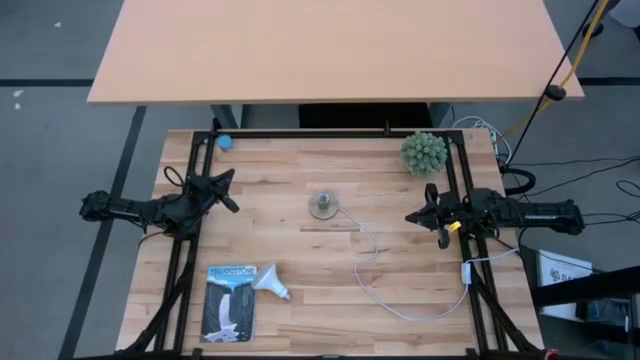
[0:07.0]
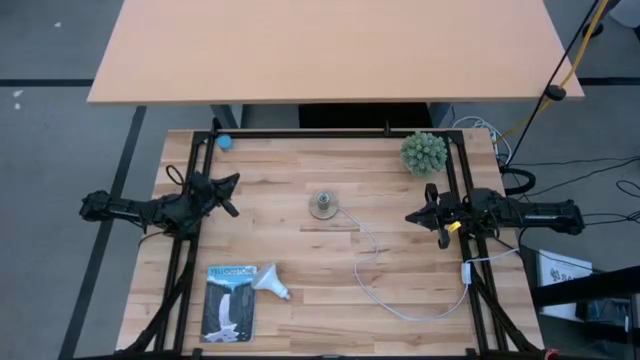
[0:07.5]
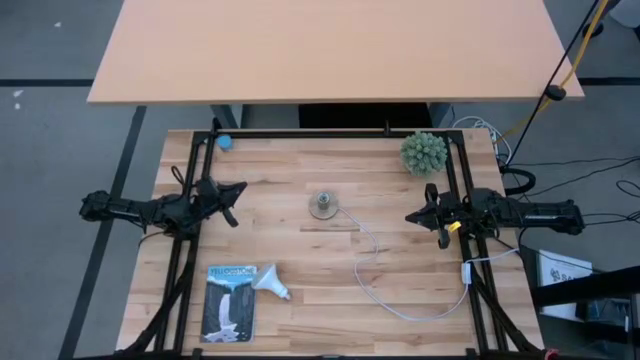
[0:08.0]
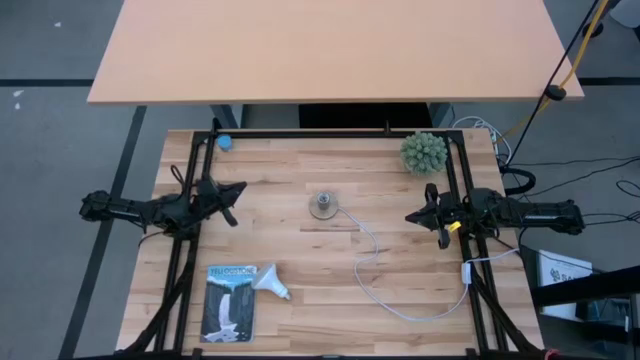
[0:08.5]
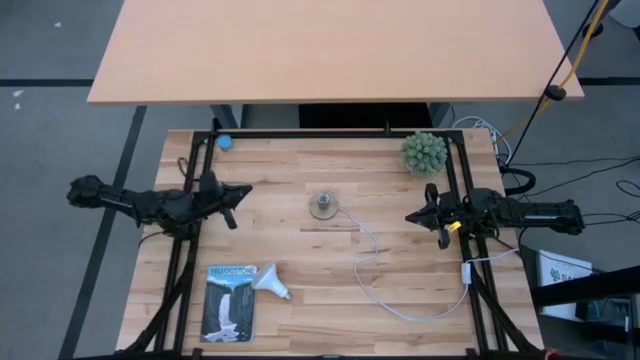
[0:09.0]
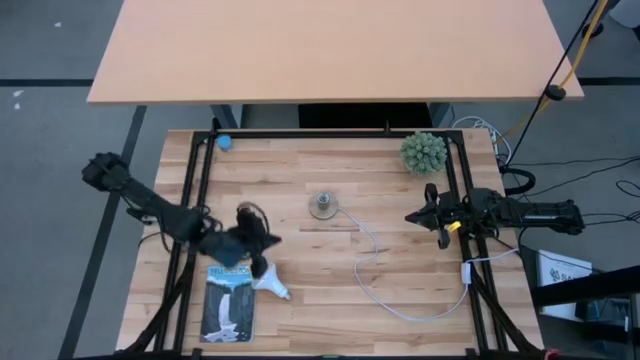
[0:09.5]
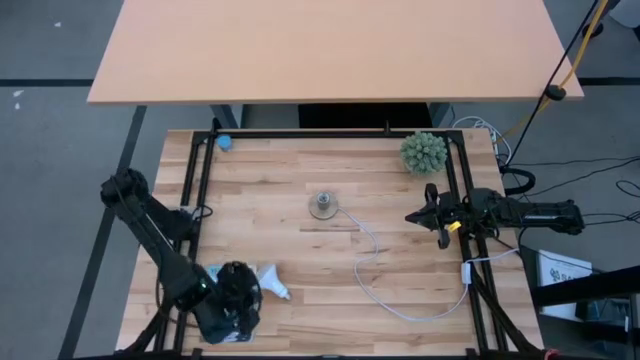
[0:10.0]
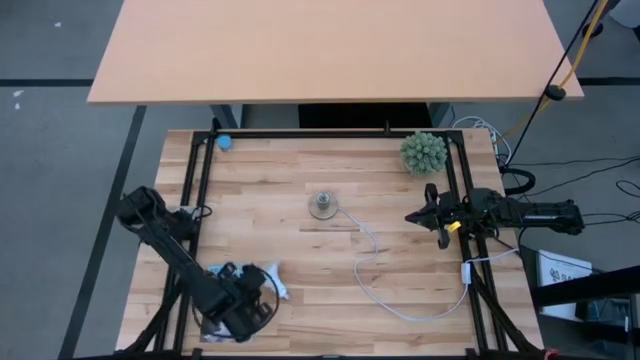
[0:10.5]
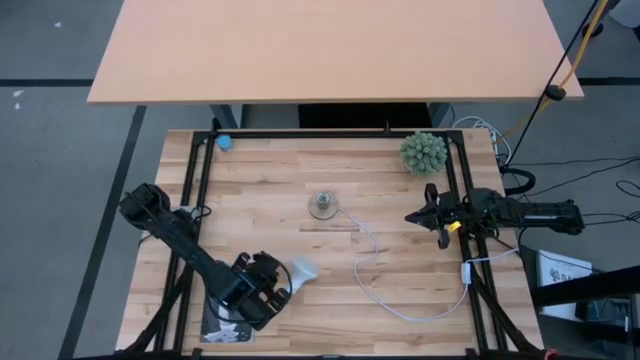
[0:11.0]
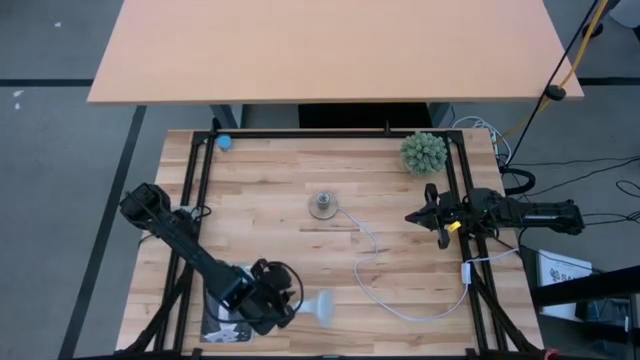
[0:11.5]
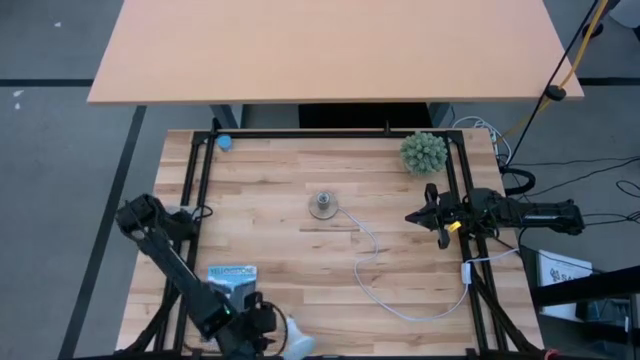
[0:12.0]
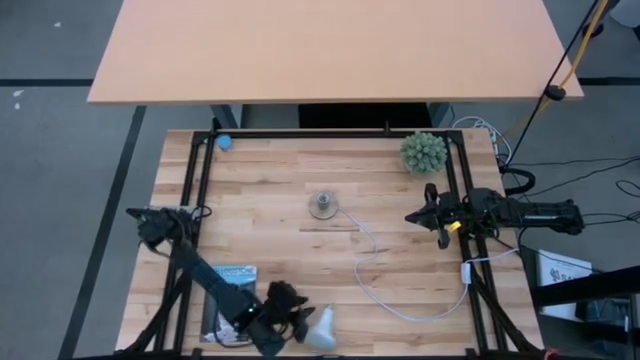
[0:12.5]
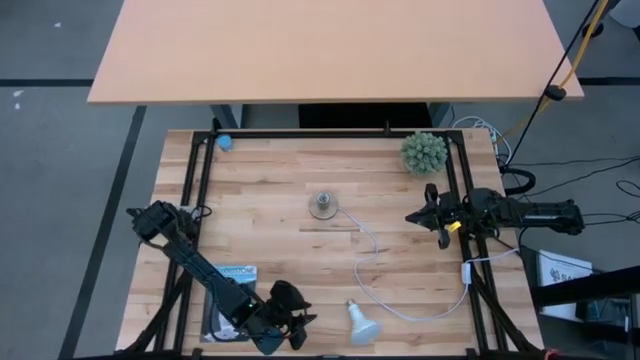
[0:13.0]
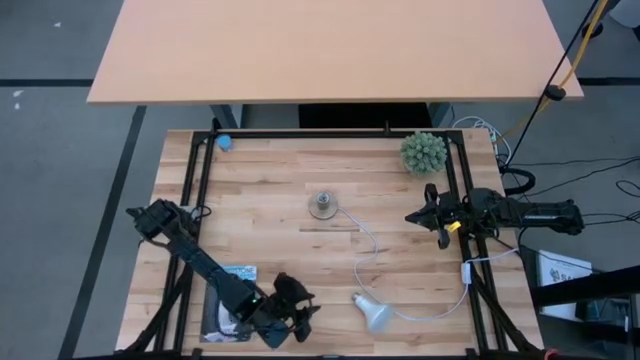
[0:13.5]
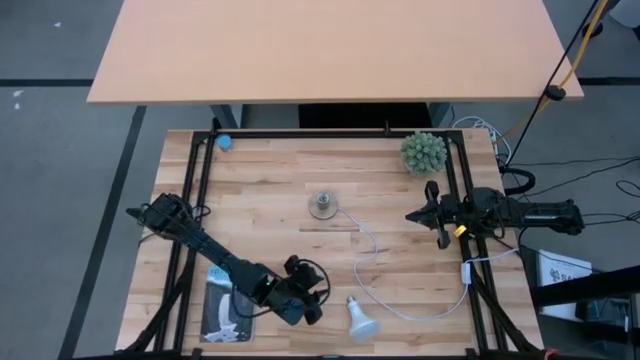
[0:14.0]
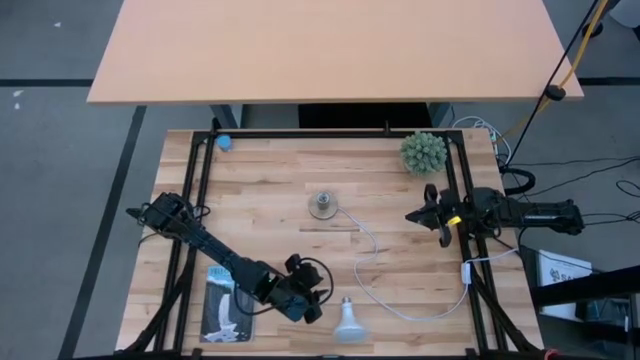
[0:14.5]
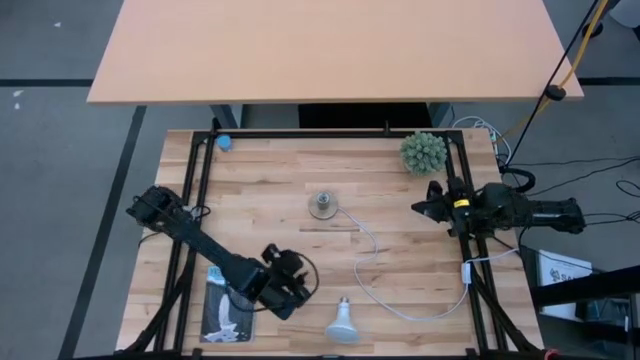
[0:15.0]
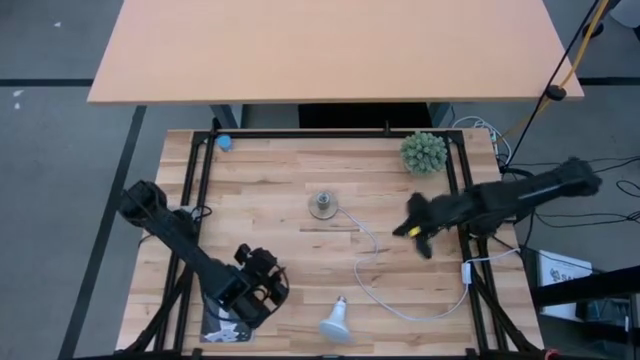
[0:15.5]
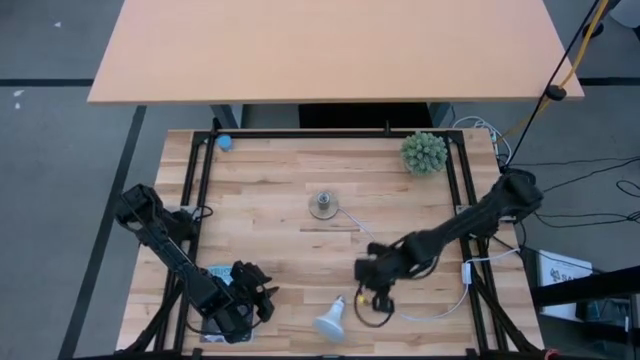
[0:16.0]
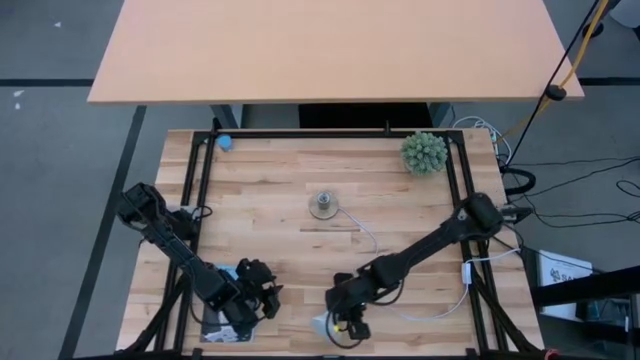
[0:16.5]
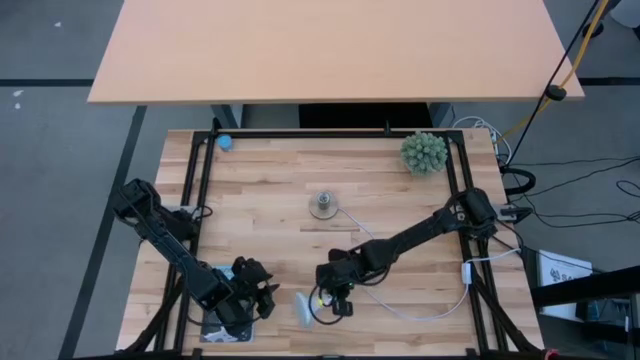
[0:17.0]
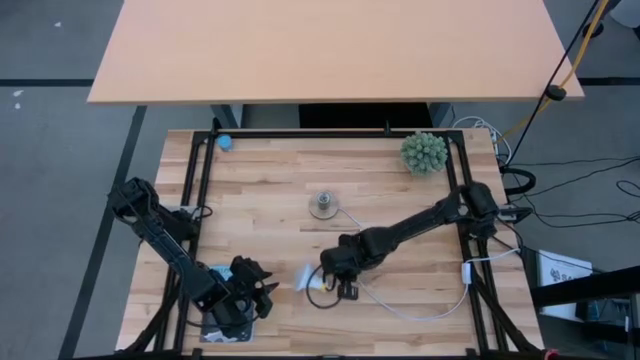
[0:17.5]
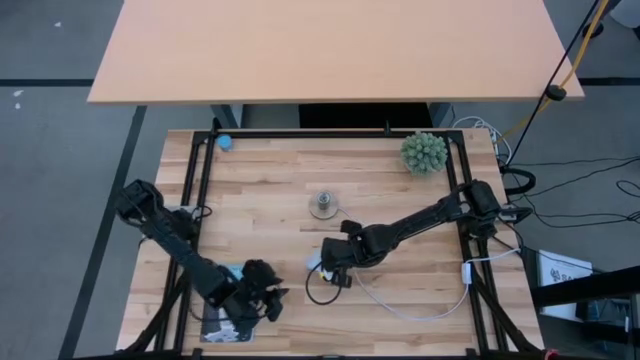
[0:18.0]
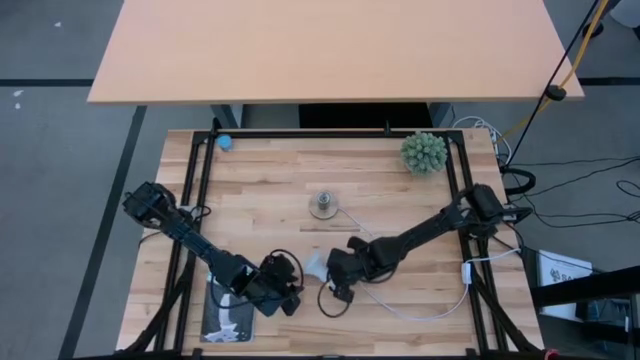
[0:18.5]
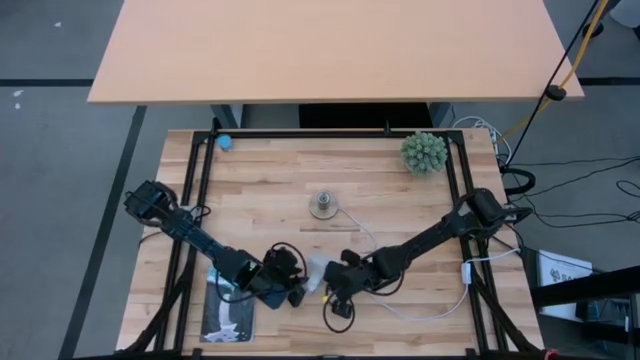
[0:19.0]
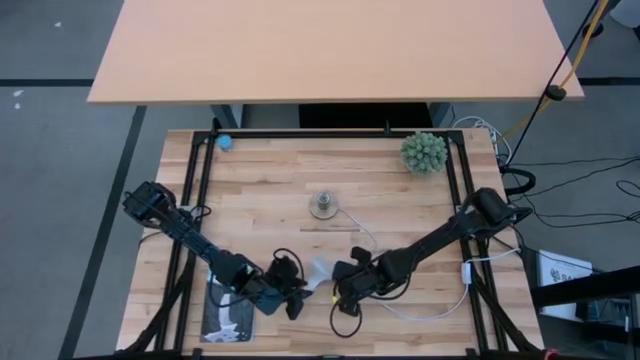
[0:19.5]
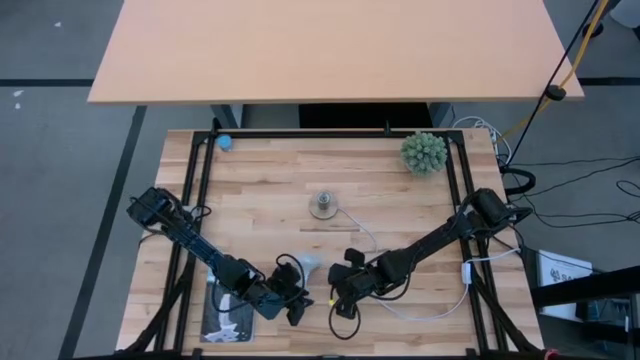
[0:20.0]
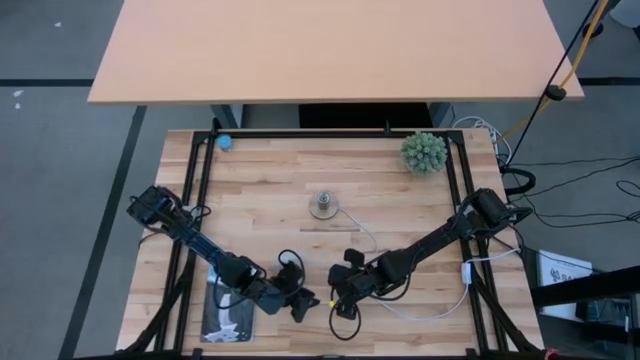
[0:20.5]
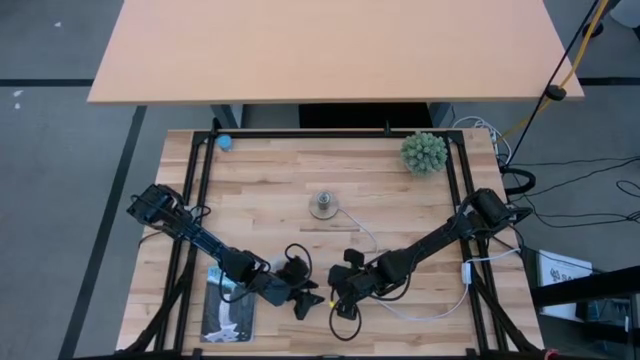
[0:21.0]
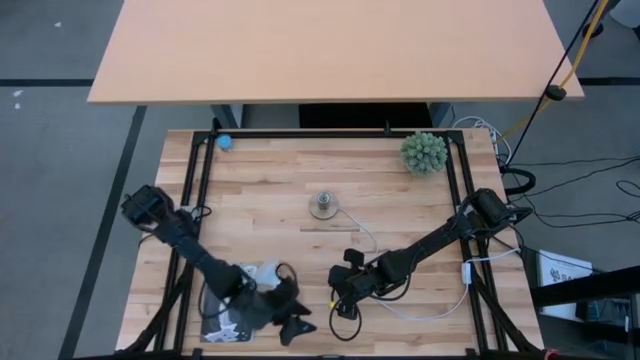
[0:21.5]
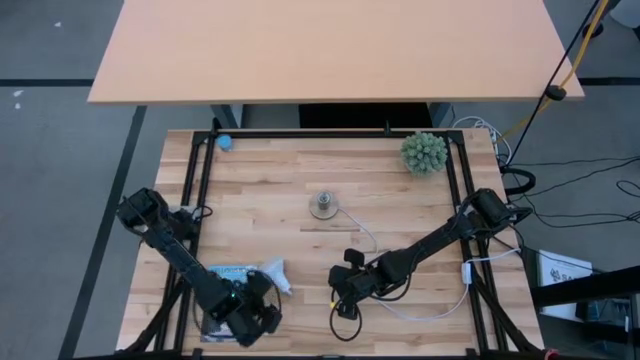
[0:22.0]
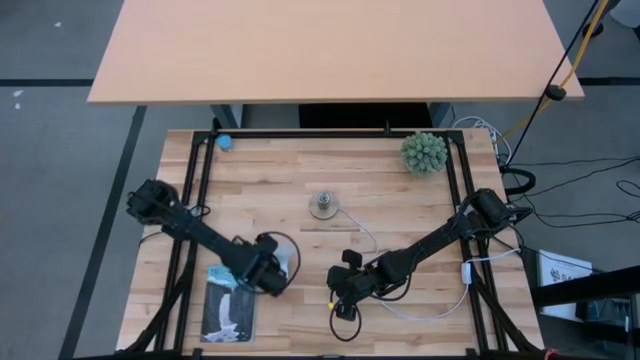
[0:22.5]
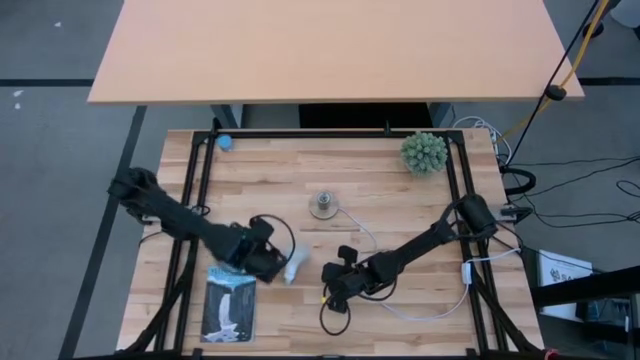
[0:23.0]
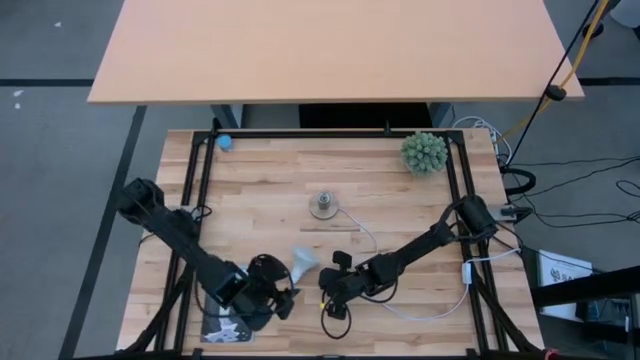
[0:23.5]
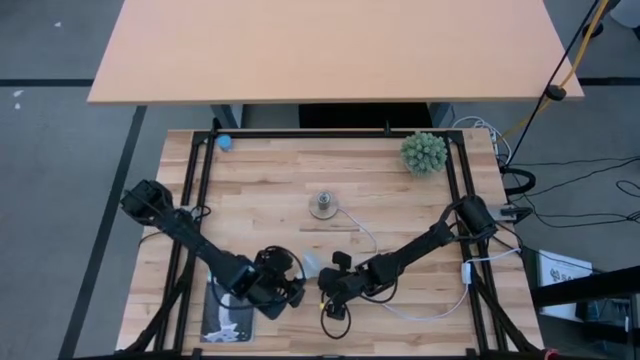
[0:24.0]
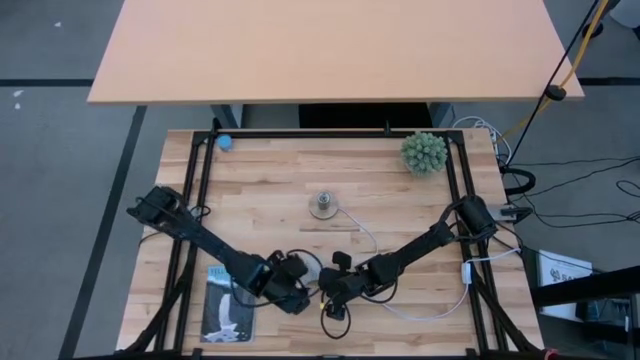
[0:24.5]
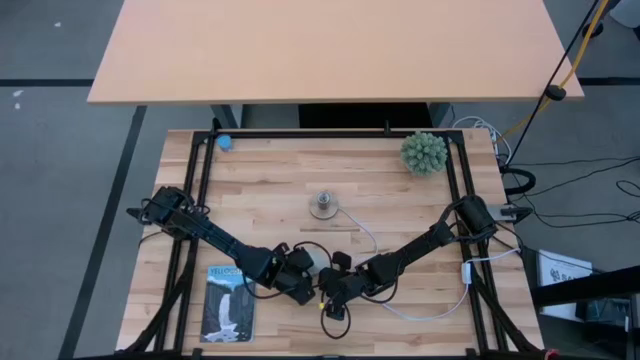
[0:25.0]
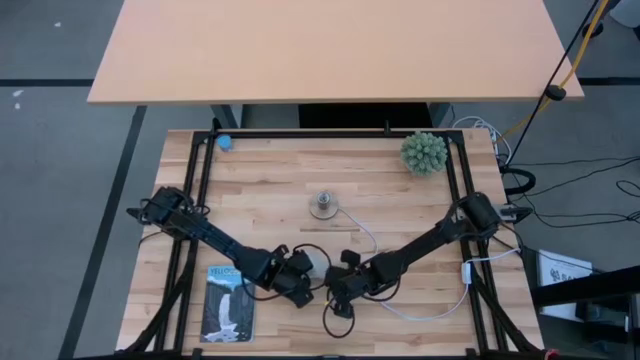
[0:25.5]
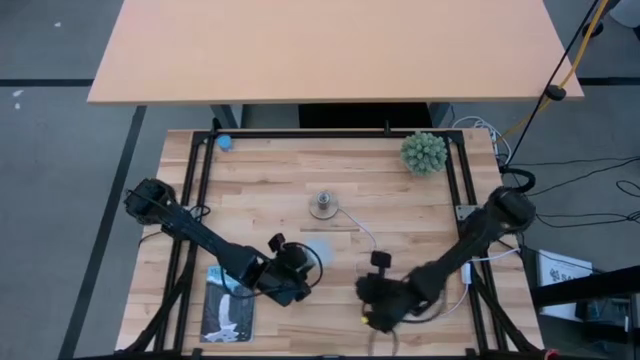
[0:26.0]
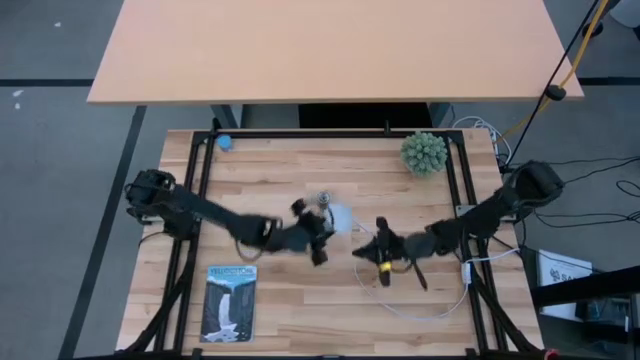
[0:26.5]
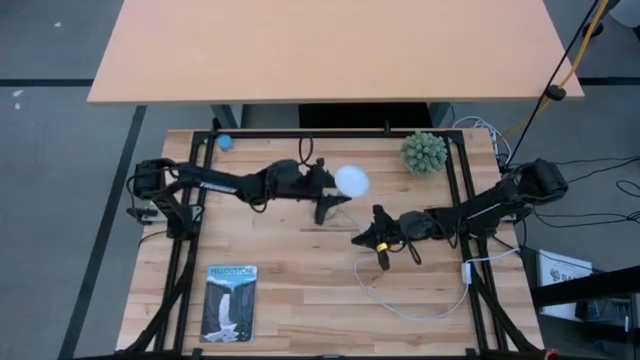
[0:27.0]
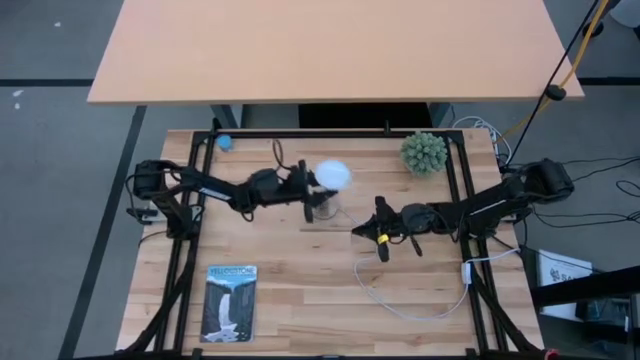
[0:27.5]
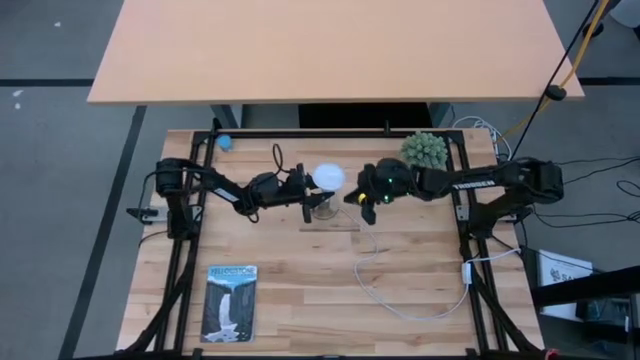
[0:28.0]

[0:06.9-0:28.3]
Task: Screw lightbulb
Insert the lightbulb into the lamp
